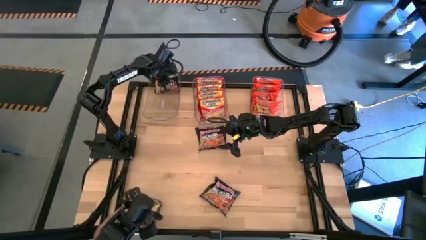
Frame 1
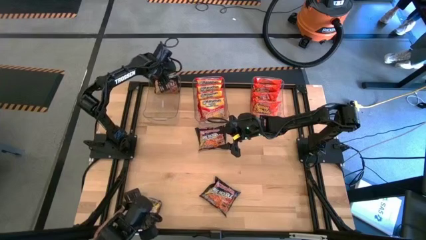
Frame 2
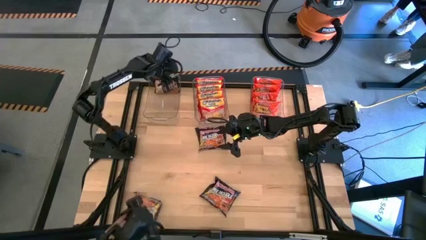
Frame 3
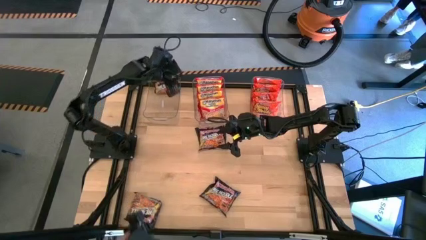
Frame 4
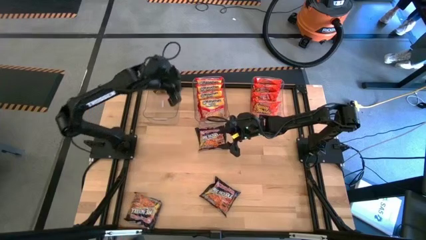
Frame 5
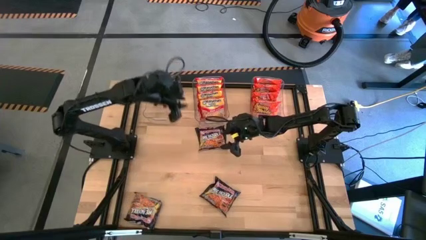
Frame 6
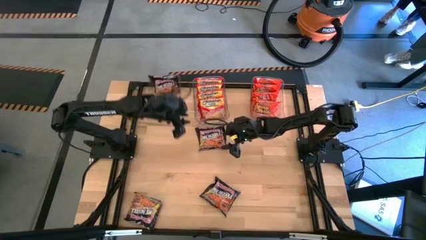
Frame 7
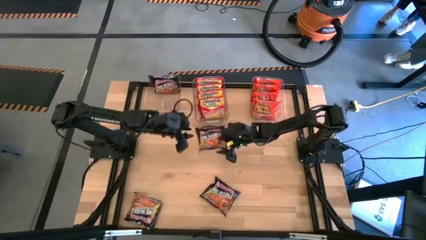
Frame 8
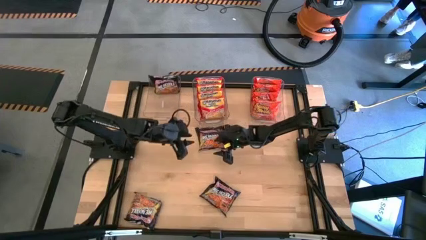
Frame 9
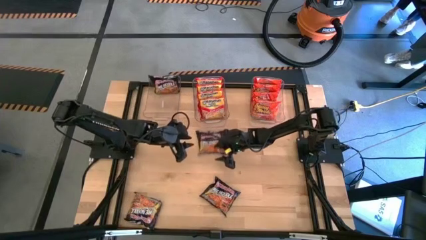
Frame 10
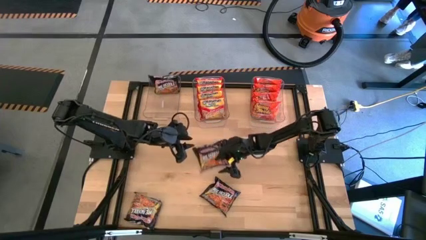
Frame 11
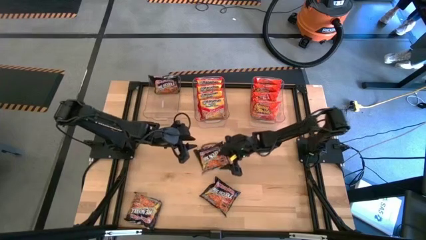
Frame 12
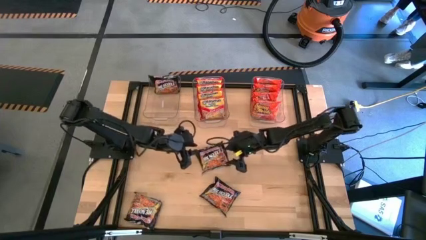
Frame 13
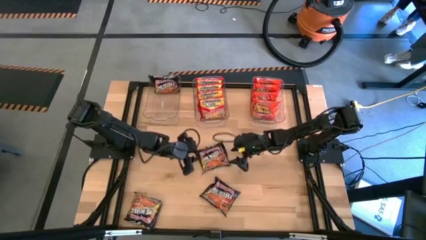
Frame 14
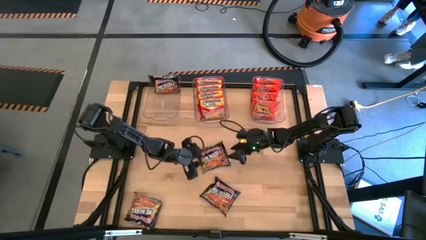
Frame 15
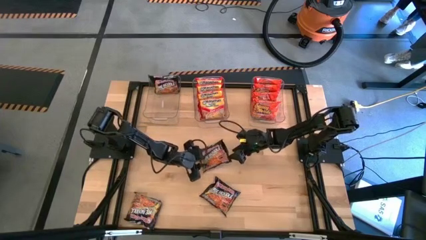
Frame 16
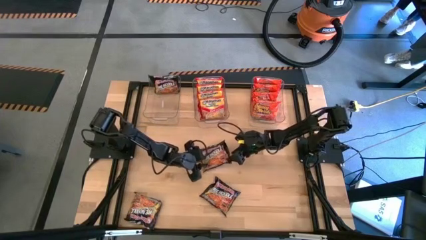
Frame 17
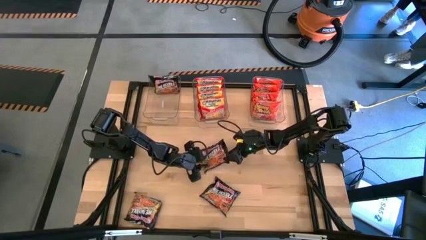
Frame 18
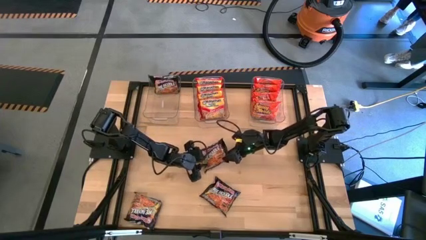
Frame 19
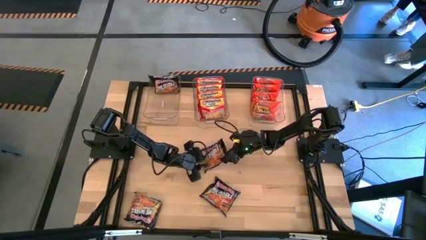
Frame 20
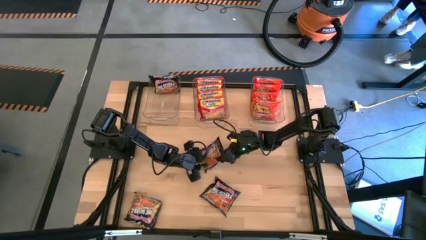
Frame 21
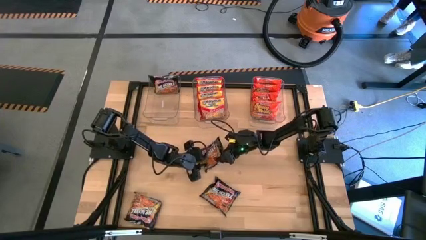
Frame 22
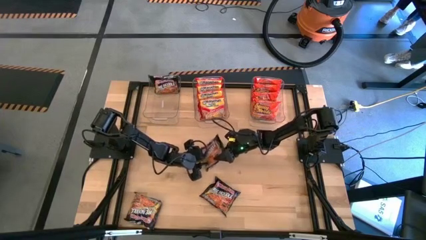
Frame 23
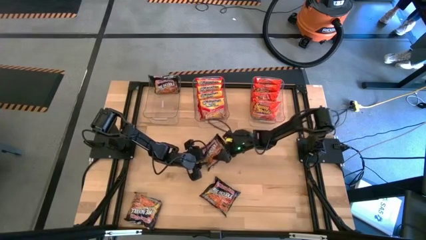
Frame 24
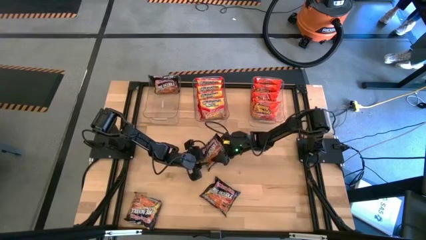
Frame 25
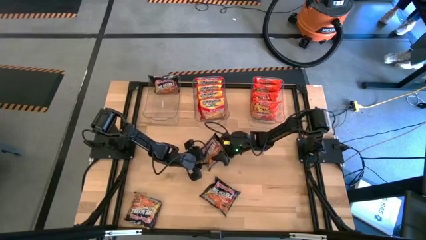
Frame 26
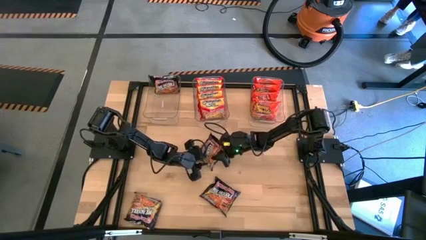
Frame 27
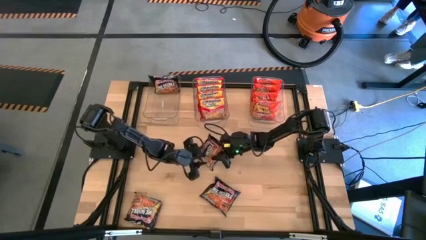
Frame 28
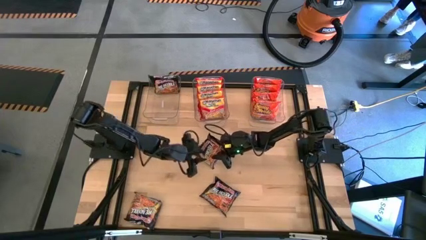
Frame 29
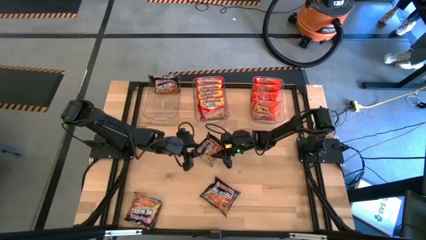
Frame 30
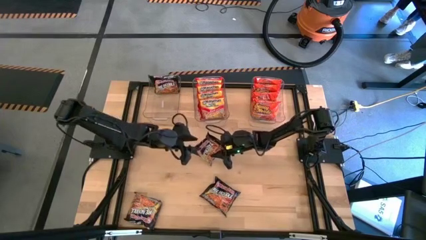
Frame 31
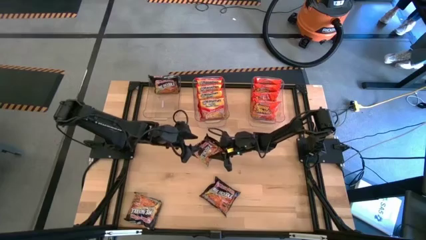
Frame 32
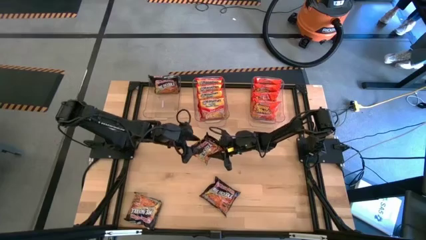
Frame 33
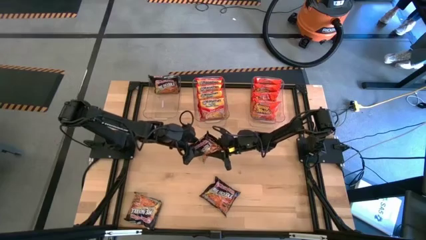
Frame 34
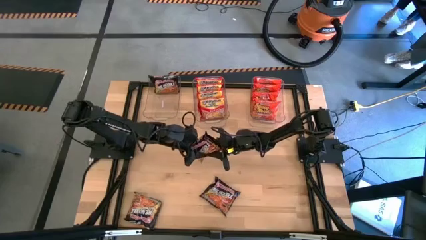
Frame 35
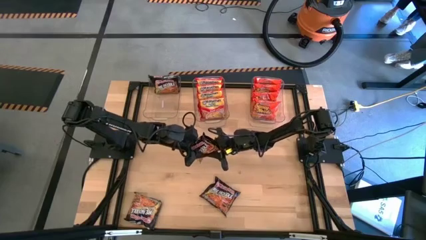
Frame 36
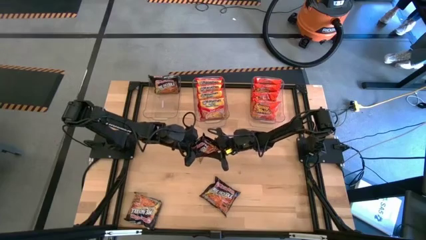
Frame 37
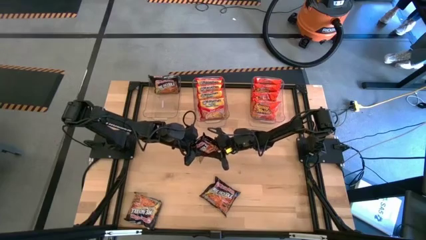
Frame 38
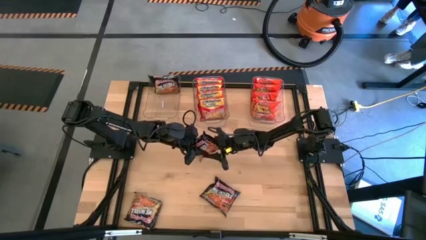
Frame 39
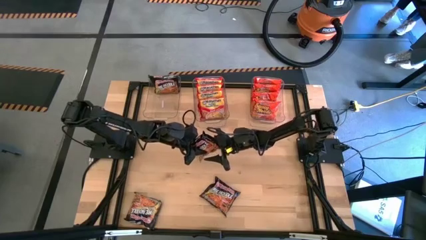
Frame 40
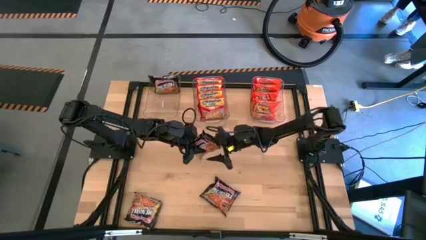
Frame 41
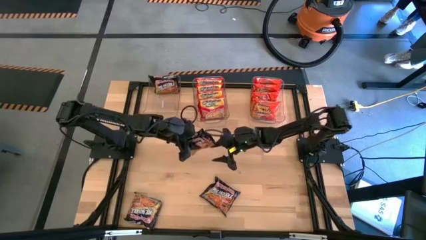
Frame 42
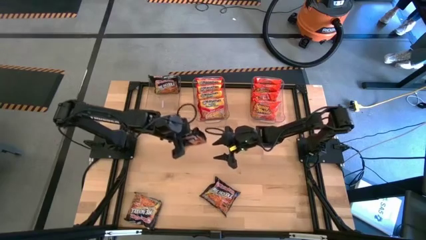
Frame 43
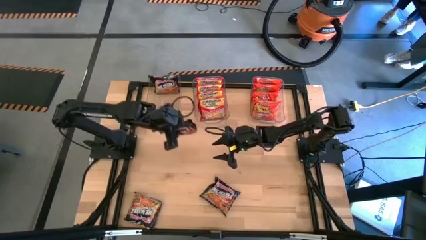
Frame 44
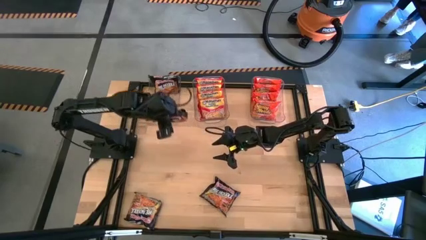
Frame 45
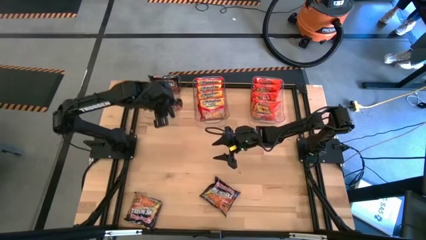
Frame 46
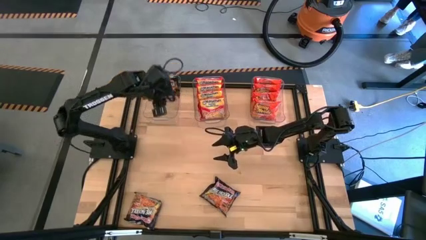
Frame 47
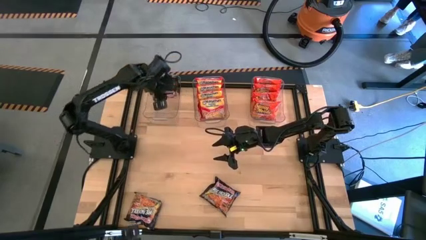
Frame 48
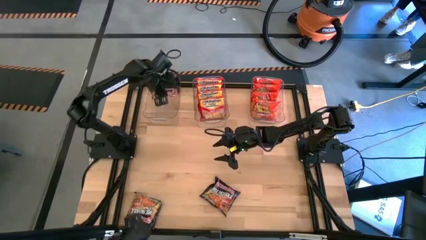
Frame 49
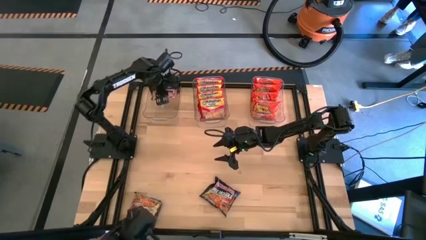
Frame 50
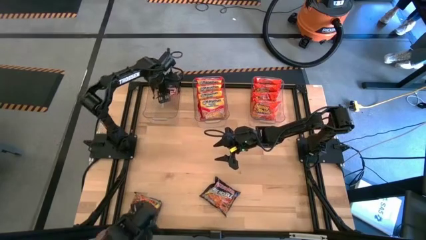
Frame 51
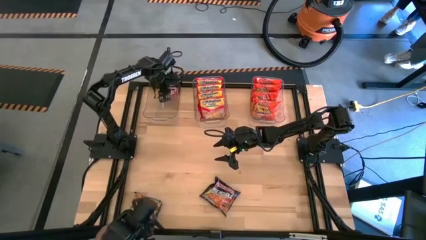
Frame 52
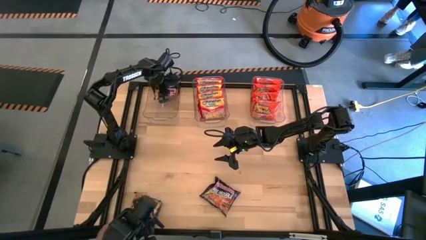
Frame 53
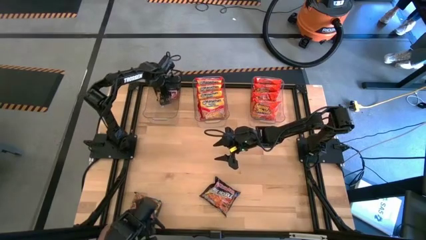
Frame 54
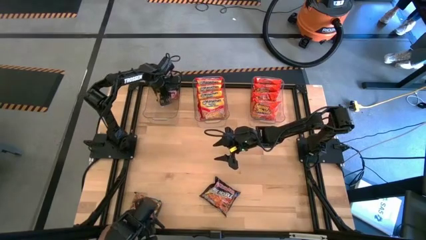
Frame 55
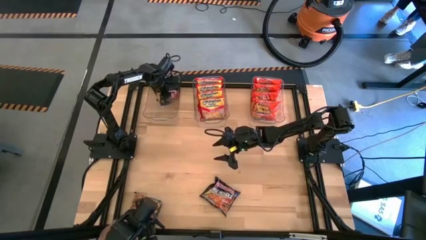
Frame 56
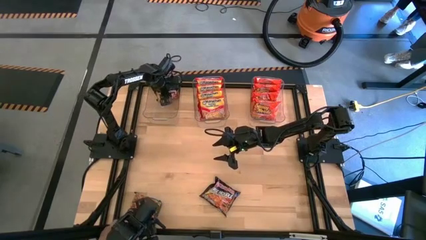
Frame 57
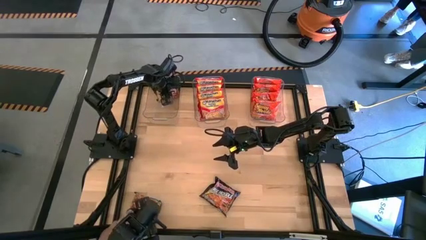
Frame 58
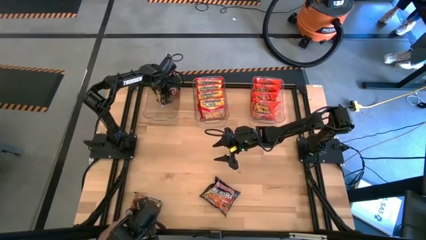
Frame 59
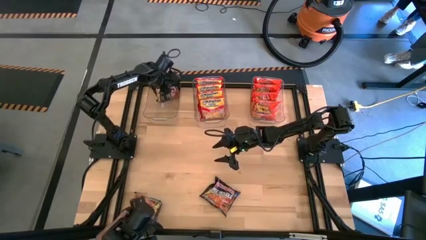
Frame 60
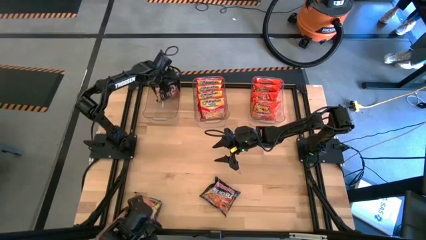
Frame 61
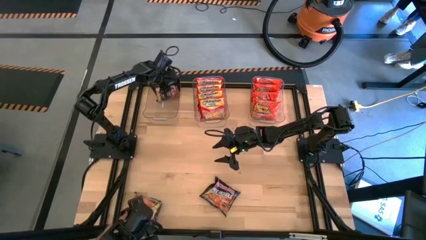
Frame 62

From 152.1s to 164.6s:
Task: Sort Maruchan noodles
Put the top right black noodle pack into the left transparent bin
